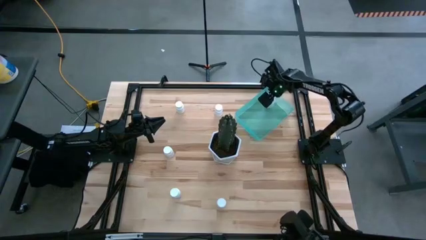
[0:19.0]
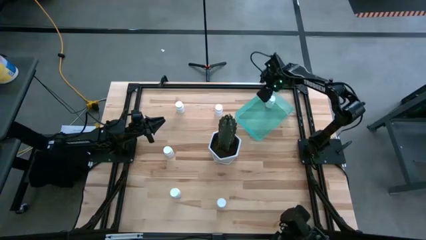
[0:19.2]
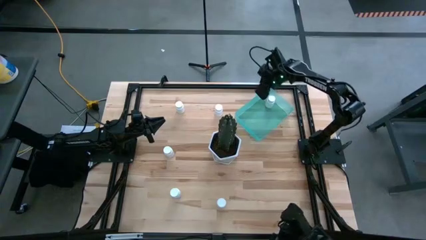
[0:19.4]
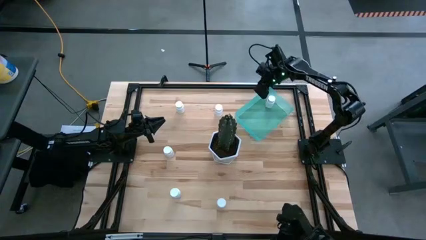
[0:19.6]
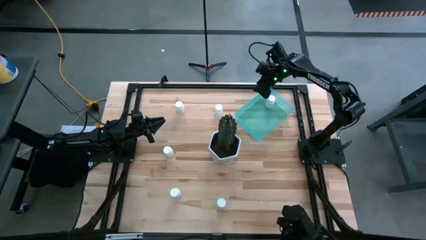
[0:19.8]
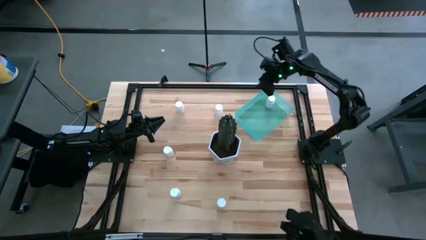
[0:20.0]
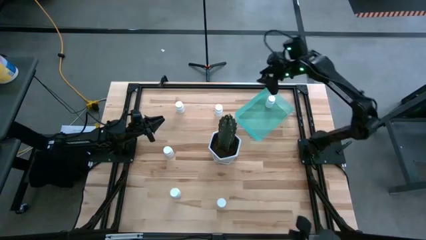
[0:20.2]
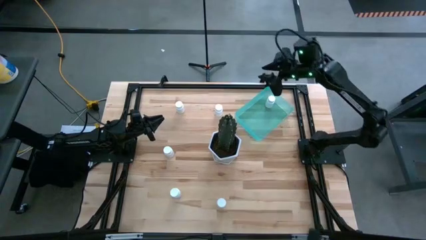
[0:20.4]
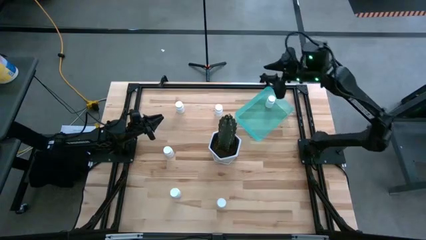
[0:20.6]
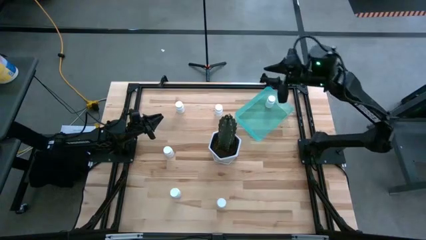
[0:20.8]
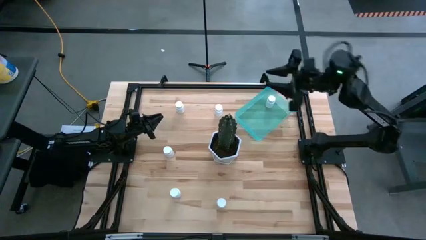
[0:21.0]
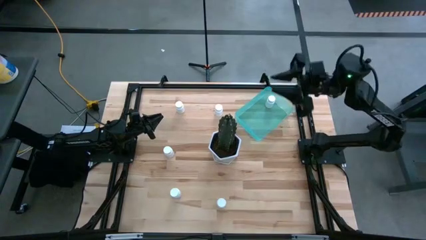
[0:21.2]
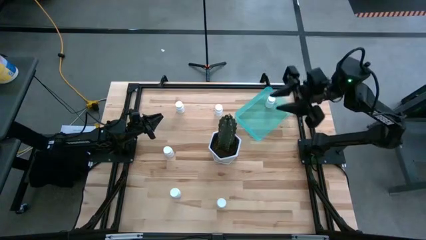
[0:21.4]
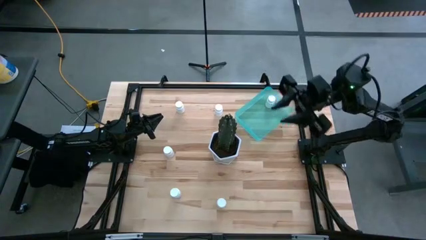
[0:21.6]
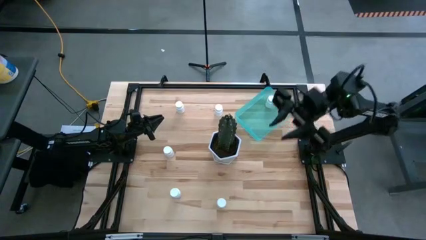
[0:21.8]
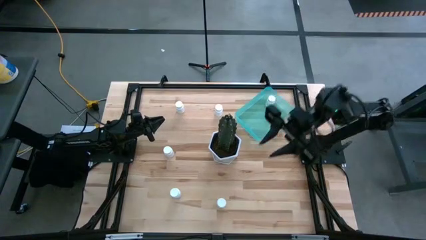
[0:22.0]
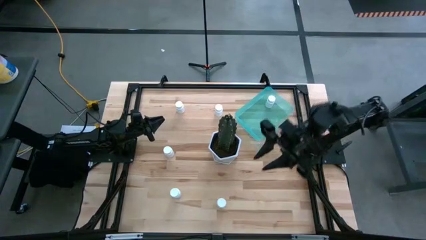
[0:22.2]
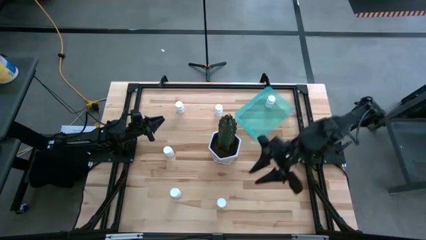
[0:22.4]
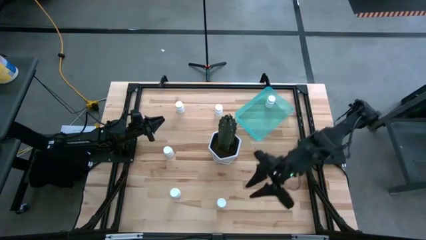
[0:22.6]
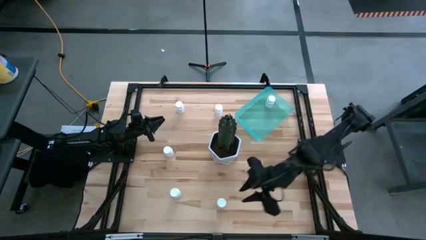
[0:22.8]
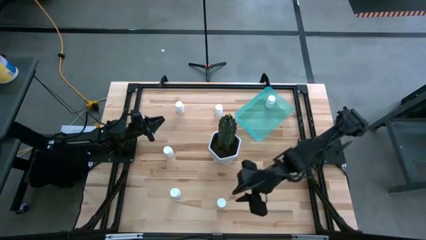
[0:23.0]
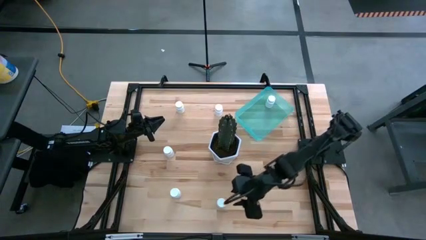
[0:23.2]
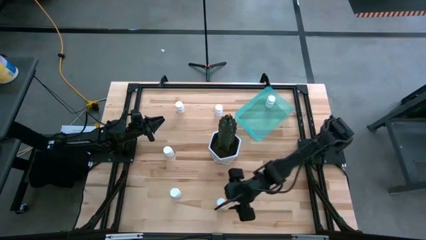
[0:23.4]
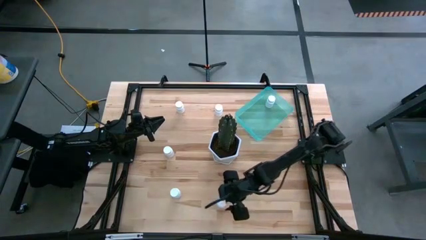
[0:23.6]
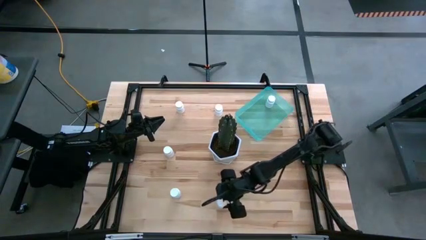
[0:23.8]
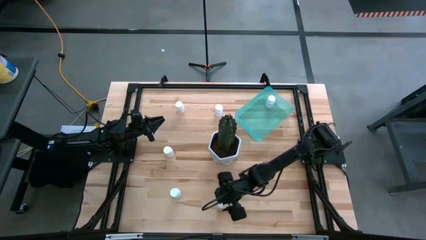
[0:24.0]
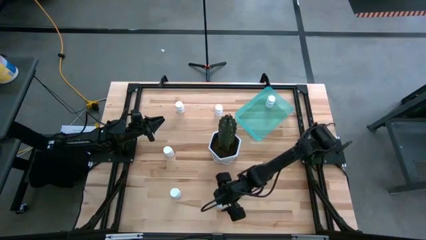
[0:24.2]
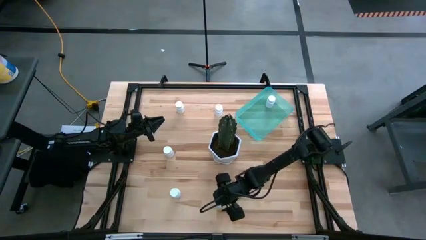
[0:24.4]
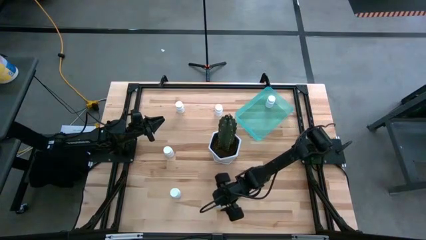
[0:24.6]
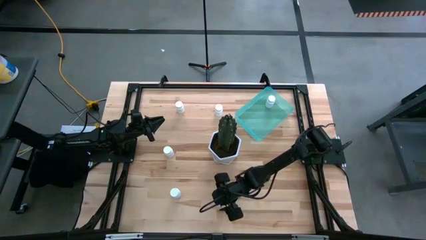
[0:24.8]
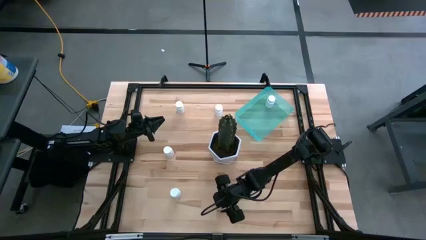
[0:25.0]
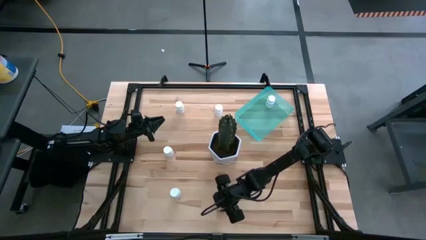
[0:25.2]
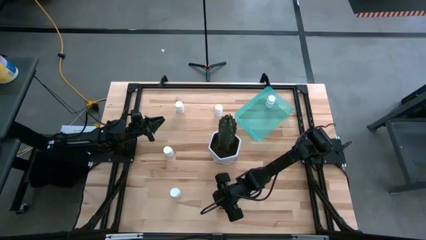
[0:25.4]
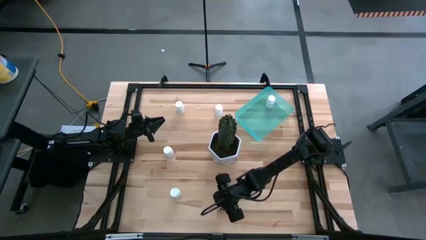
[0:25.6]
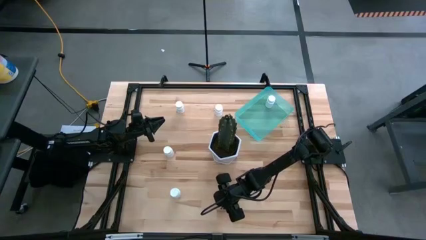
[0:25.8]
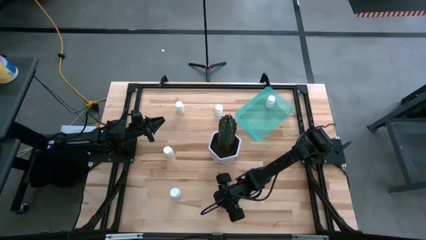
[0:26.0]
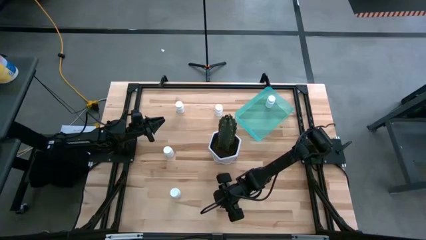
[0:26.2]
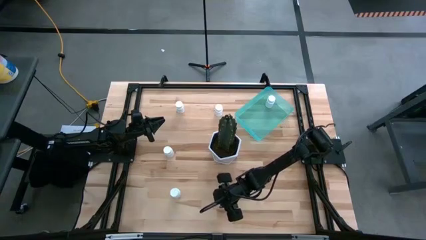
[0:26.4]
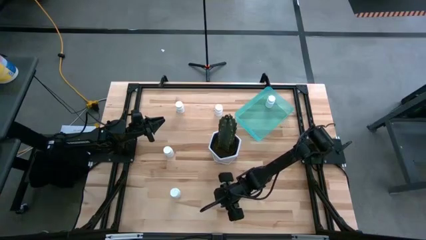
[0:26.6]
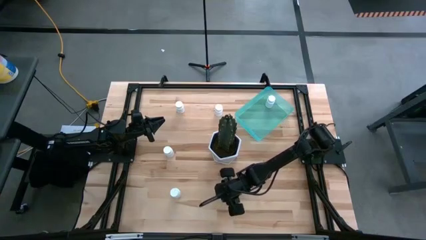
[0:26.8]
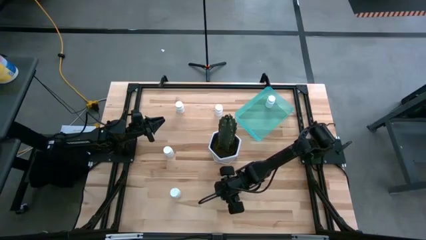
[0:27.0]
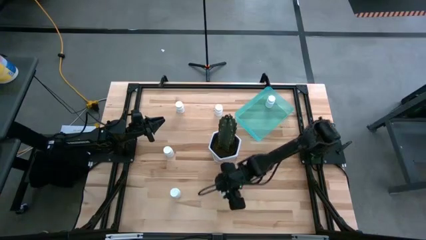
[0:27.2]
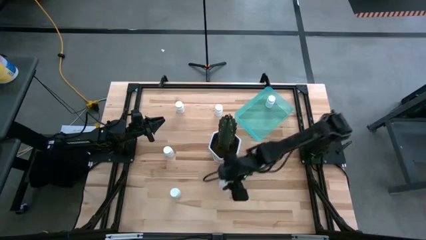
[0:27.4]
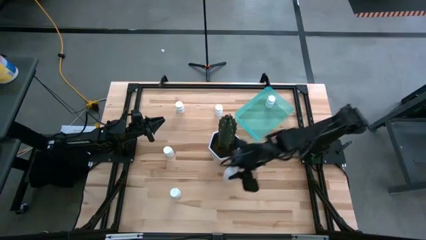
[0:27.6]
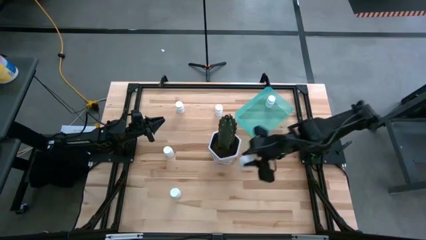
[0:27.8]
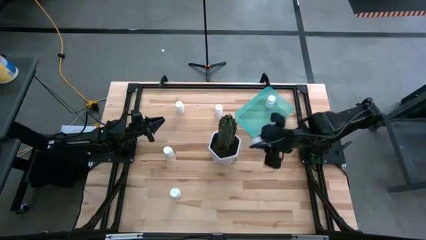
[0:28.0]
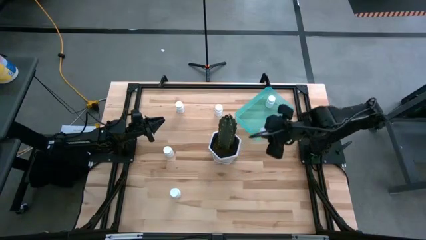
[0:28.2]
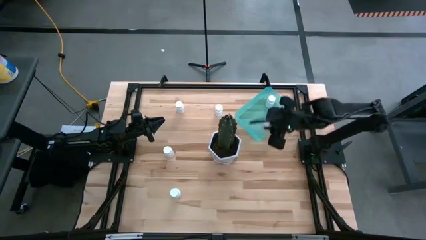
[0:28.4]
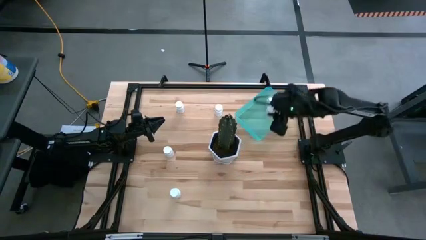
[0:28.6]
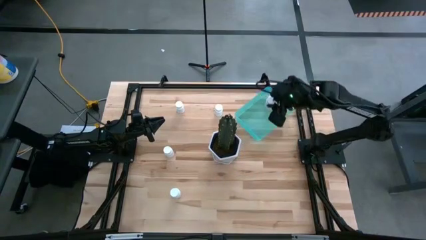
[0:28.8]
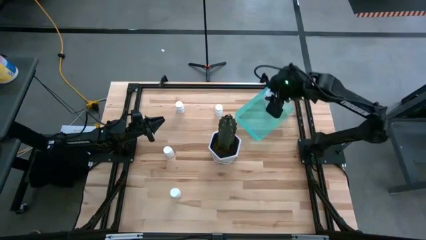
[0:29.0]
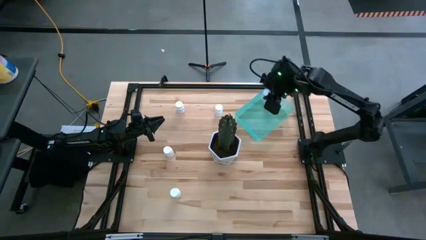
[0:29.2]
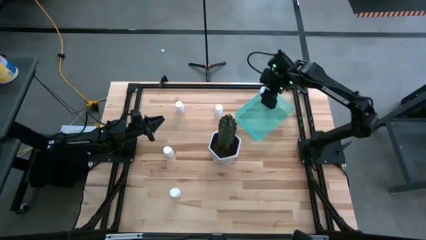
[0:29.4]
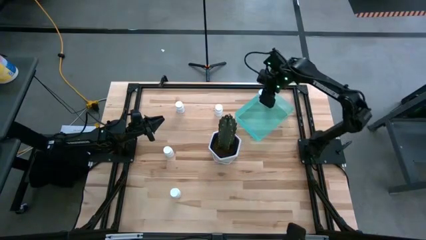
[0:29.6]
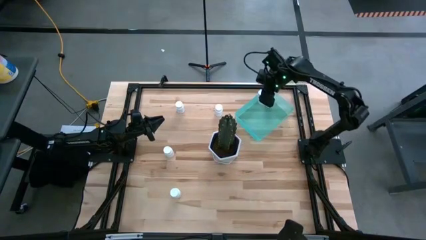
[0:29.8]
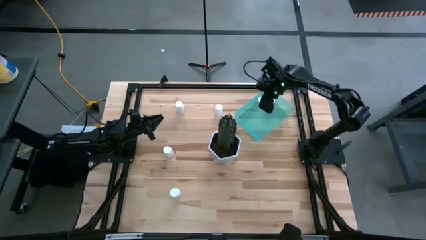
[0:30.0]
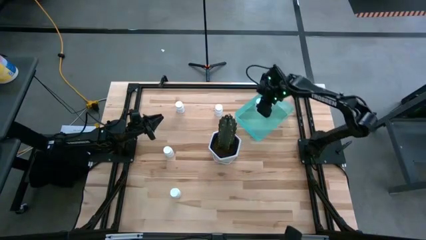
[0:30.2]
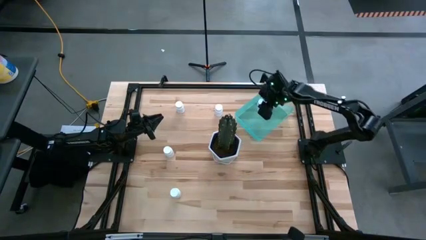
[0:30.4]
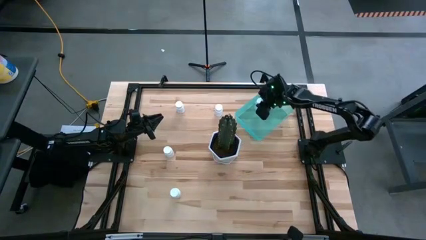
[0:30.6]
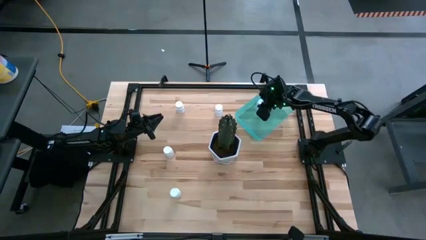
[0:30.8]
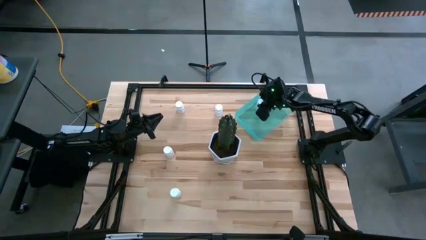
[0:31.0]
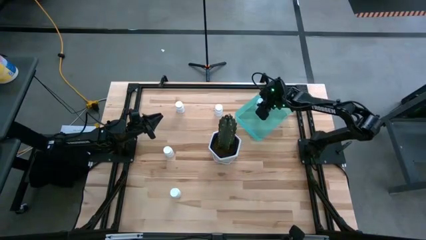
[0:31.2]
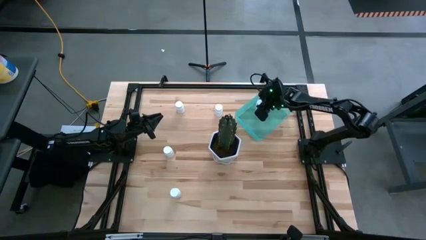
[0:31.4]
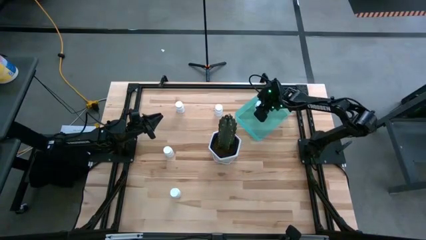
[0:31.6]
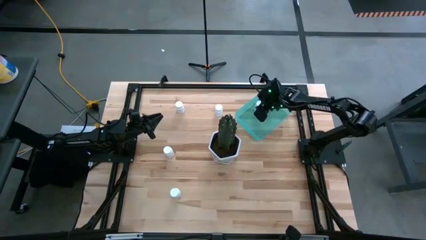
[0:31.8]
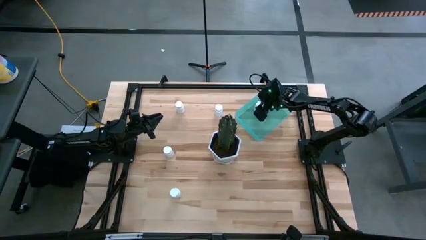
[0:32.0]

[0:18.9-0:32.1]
Task: Pick and place pill bottles into a basket
Put the white medicine bottle into the blue bin

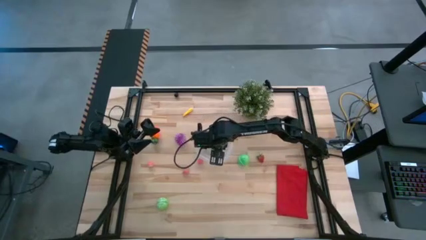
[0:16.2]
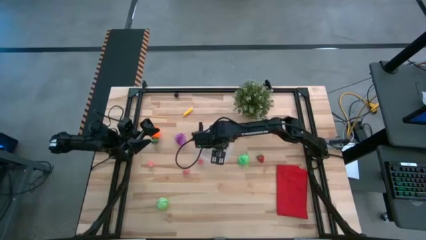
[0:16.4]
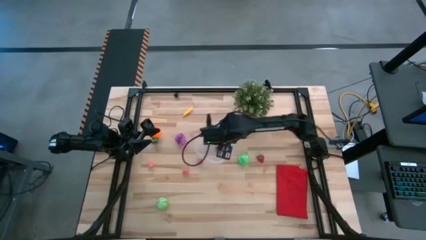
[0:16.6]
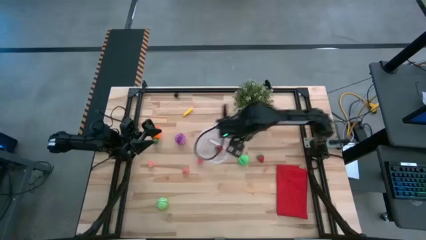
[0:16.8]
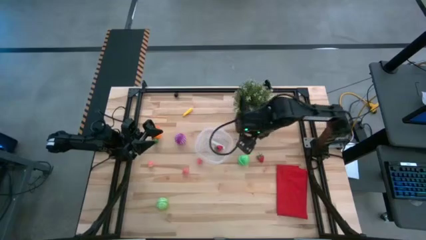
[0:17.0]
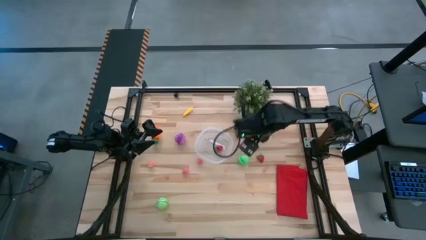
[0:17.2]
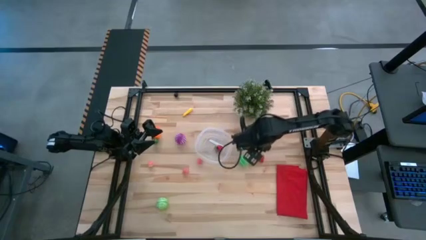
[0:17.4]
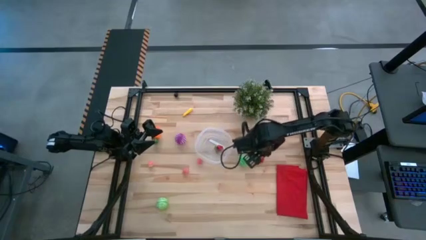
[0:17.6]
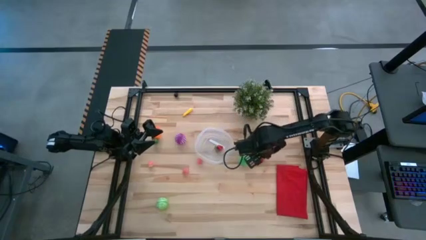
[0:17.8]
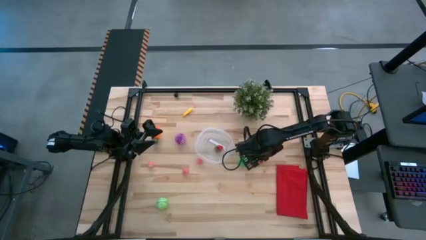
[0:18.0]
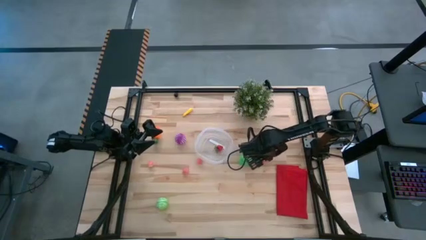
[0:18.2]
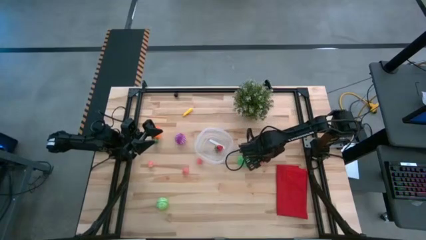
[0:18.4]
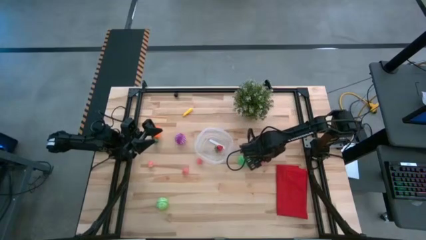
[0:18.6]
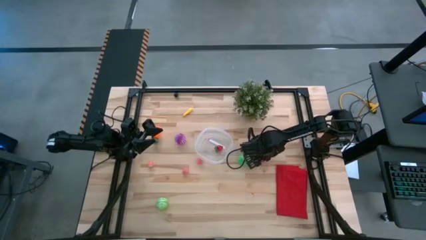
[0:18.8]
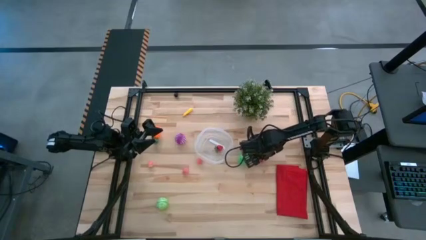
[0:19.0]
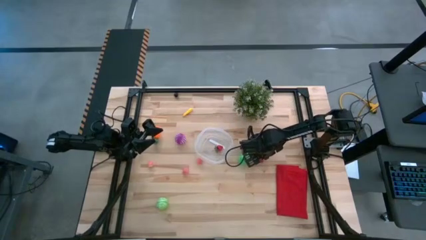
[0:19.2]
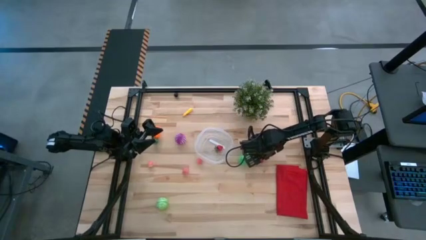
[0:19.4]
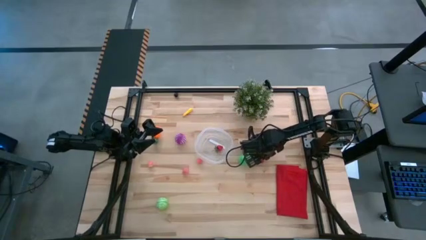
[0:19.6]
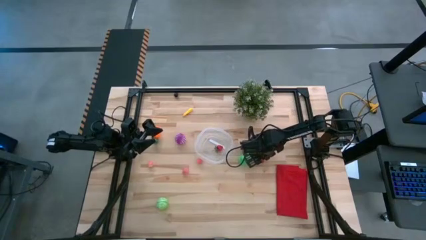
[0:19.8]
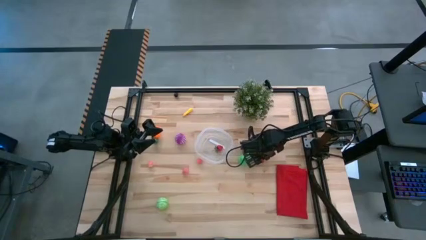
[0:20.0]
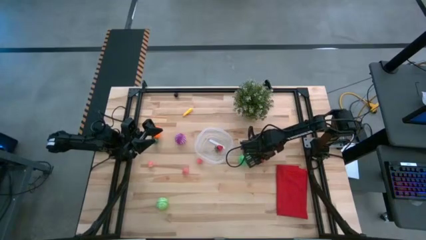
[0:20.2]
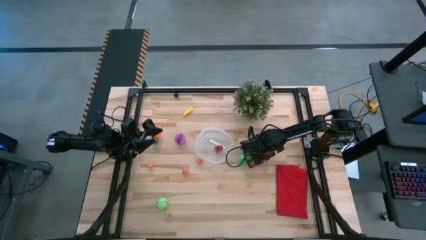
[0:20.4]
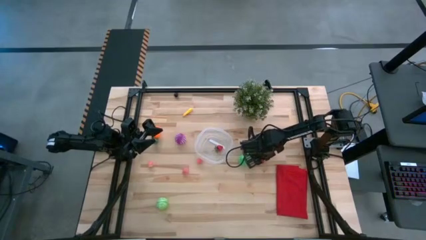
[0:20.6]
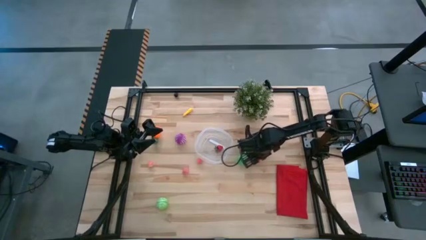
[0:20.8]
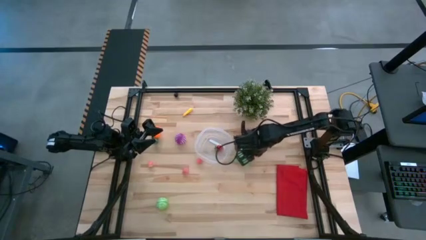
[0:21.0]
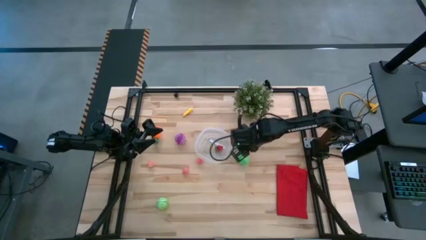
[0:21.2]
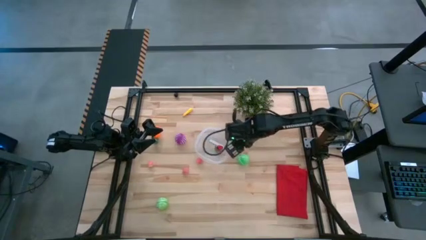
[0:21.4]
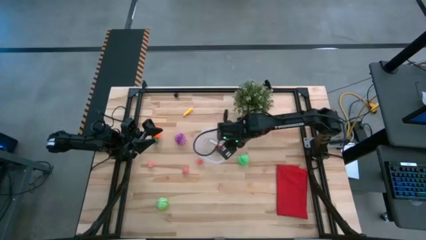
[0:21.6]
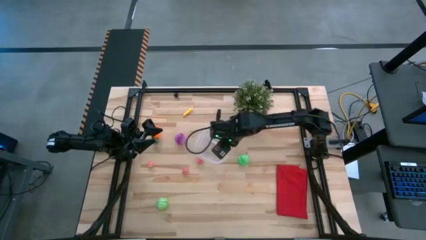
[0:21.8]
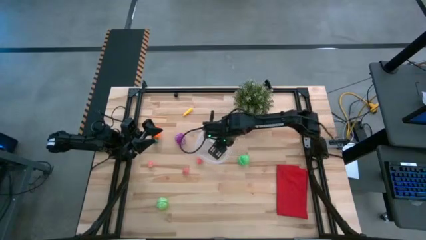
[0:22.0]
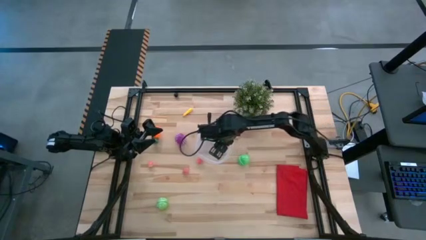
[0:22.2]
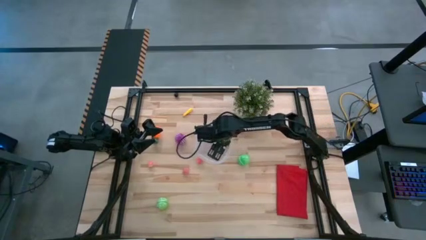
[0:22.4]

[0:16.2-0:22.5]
Task: Pick and placing Produce into tupperware
Put the red strawberry into the transparent bin
